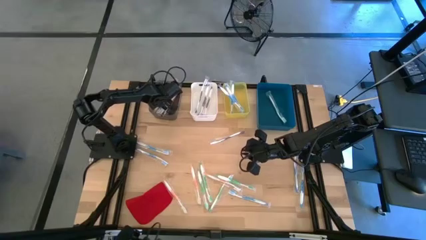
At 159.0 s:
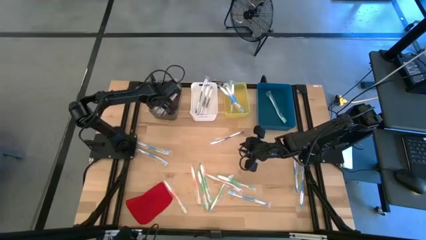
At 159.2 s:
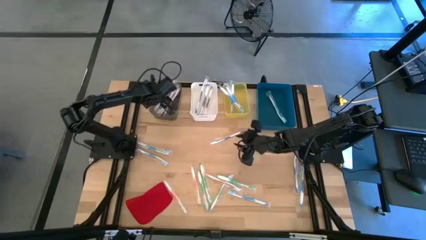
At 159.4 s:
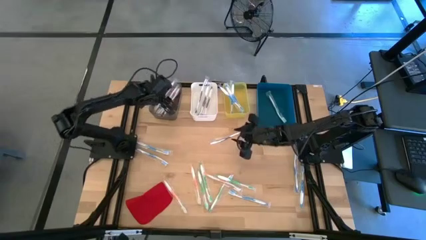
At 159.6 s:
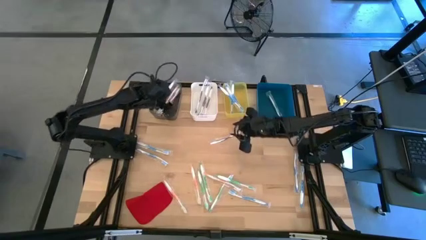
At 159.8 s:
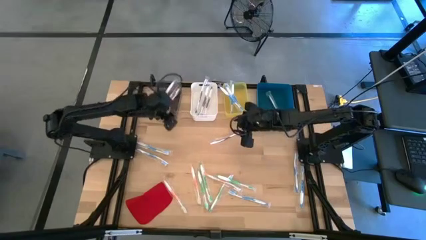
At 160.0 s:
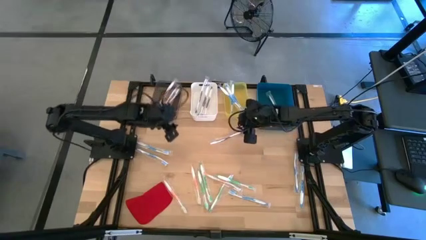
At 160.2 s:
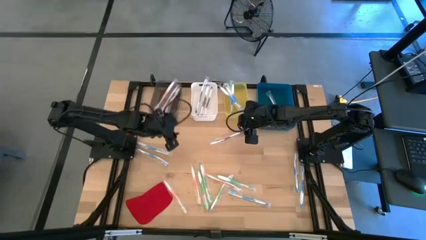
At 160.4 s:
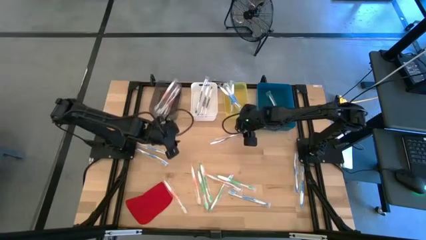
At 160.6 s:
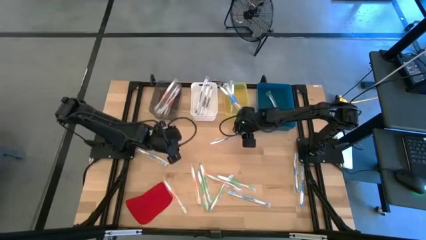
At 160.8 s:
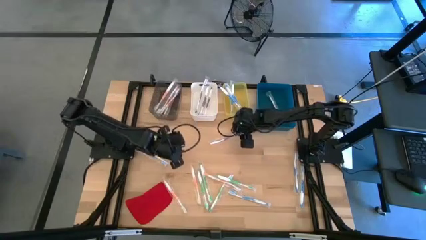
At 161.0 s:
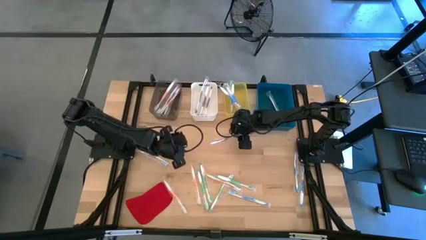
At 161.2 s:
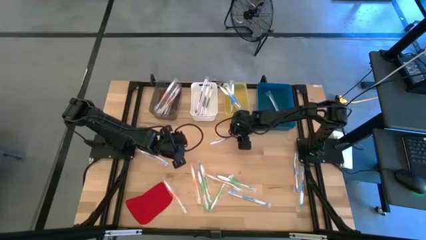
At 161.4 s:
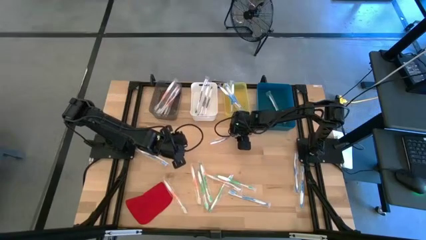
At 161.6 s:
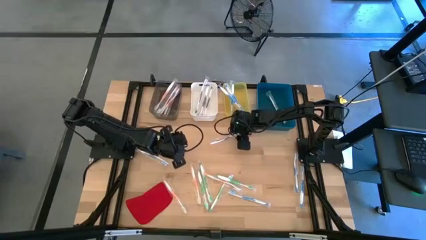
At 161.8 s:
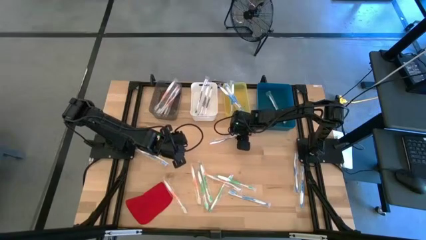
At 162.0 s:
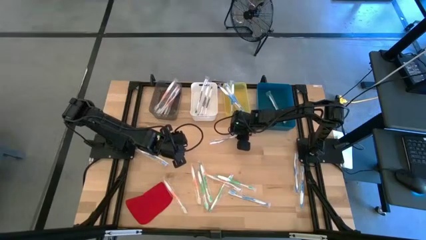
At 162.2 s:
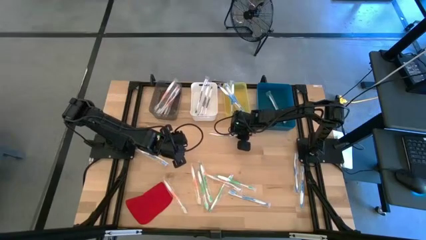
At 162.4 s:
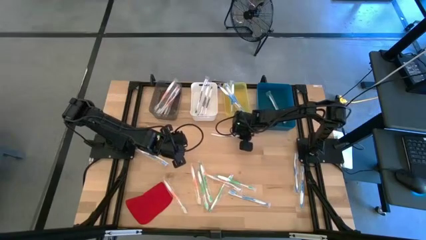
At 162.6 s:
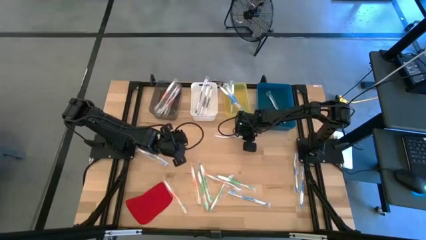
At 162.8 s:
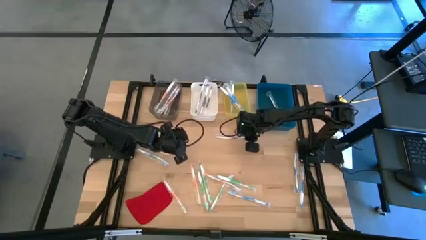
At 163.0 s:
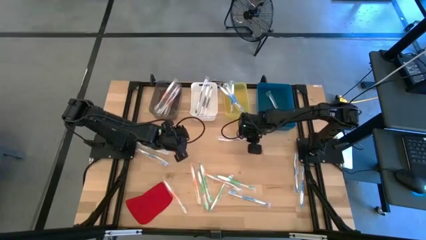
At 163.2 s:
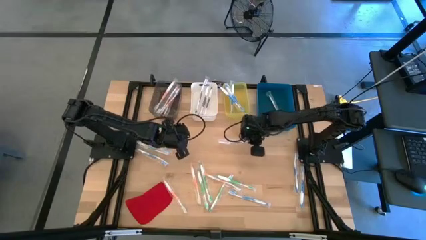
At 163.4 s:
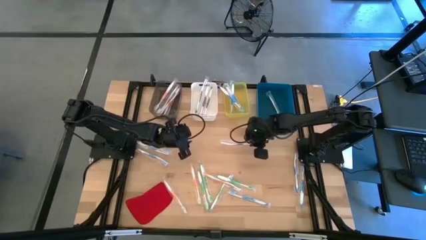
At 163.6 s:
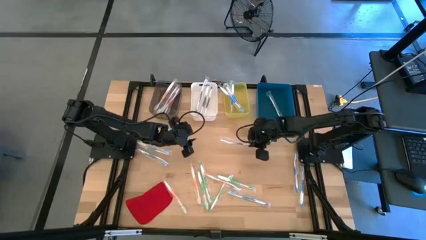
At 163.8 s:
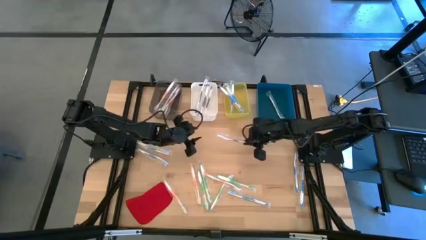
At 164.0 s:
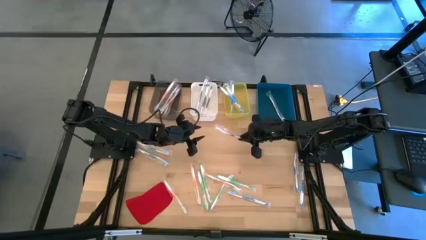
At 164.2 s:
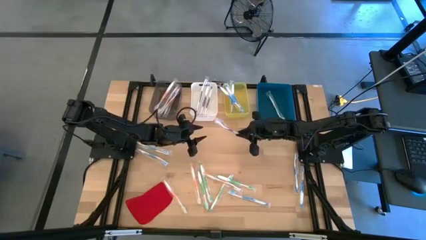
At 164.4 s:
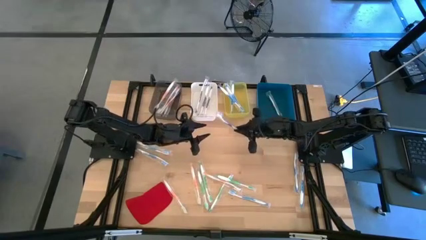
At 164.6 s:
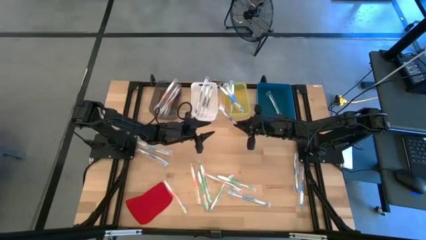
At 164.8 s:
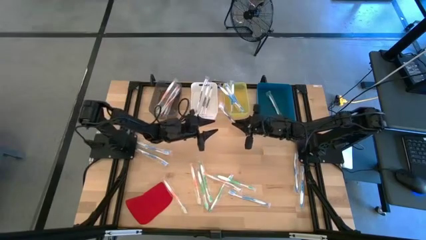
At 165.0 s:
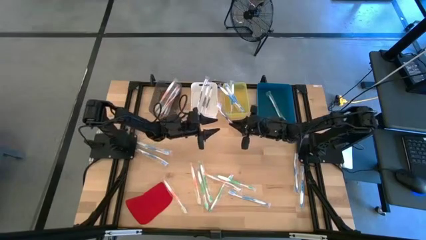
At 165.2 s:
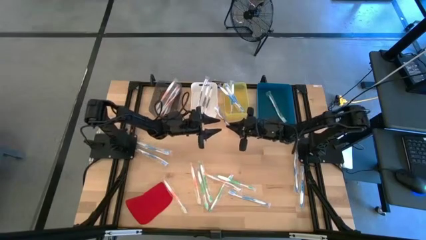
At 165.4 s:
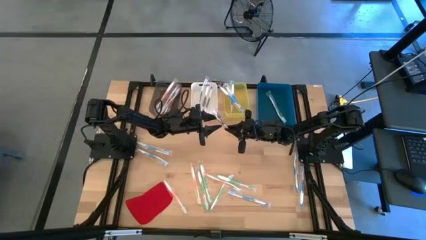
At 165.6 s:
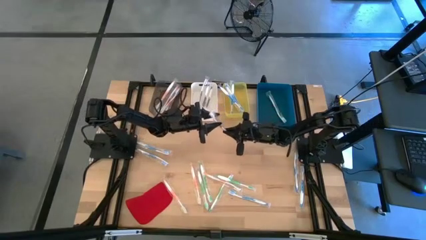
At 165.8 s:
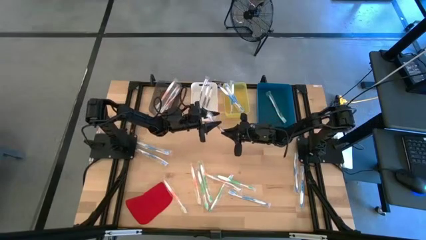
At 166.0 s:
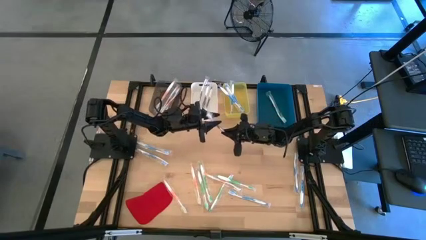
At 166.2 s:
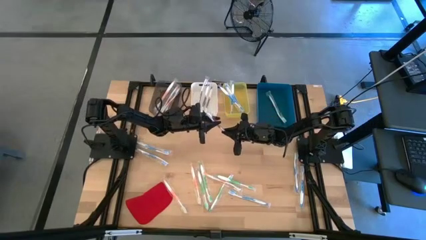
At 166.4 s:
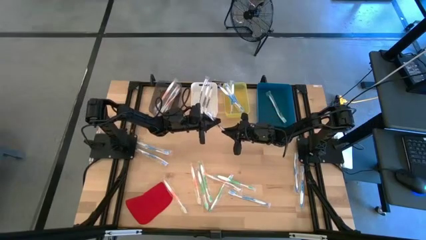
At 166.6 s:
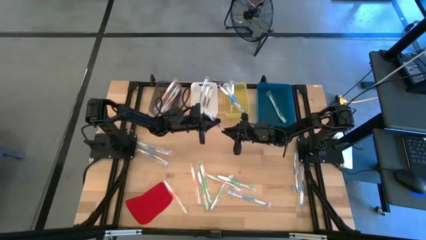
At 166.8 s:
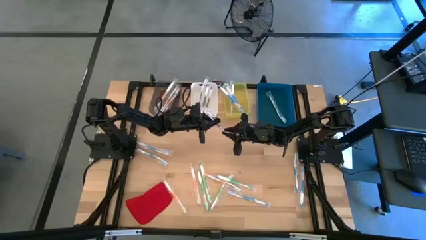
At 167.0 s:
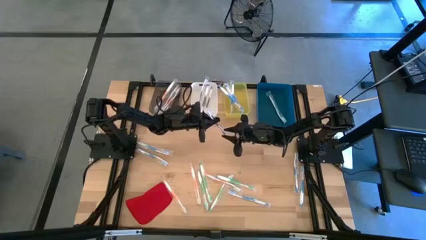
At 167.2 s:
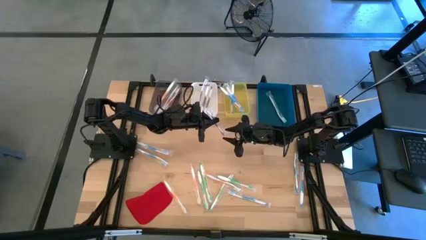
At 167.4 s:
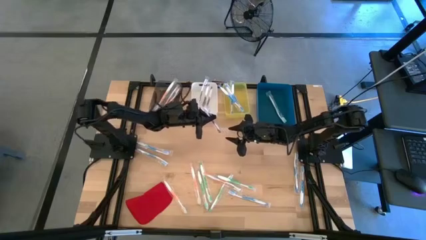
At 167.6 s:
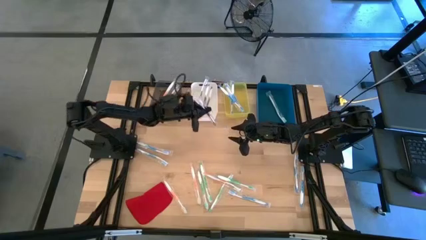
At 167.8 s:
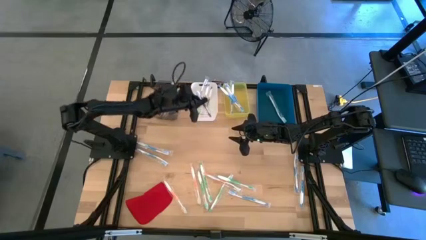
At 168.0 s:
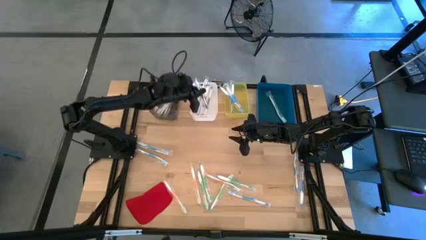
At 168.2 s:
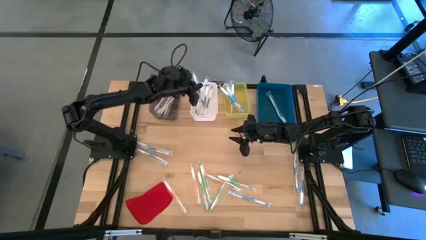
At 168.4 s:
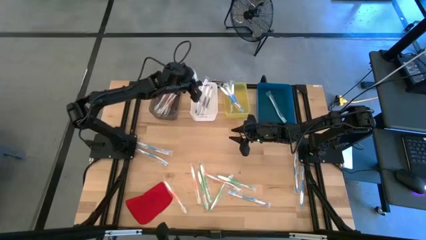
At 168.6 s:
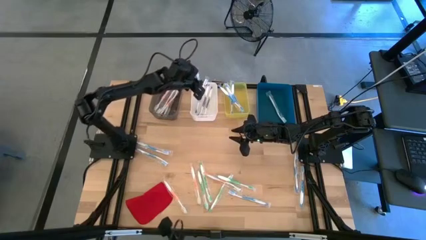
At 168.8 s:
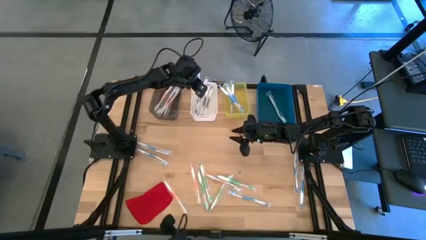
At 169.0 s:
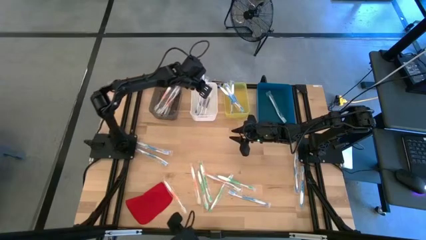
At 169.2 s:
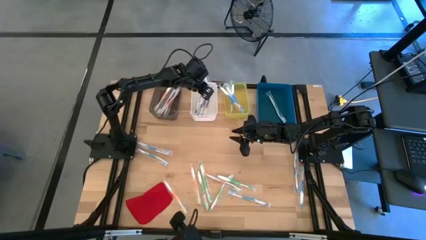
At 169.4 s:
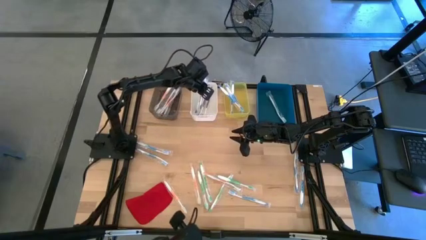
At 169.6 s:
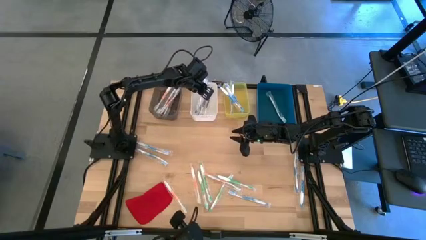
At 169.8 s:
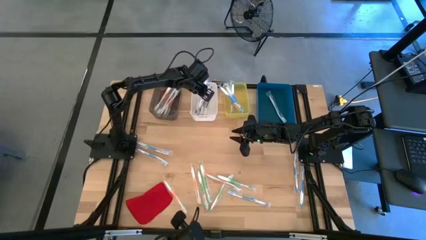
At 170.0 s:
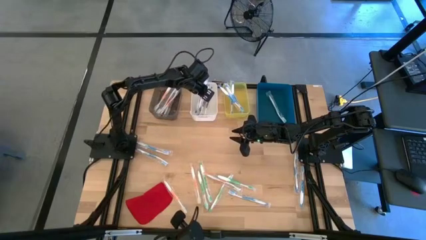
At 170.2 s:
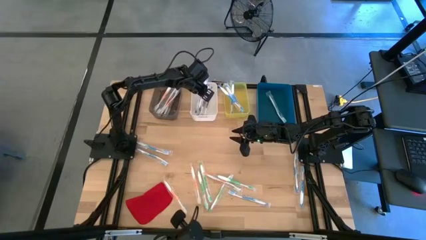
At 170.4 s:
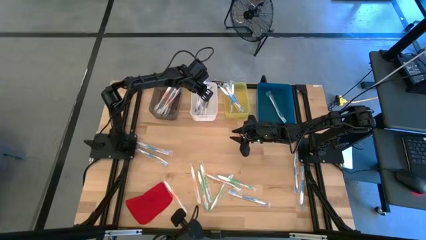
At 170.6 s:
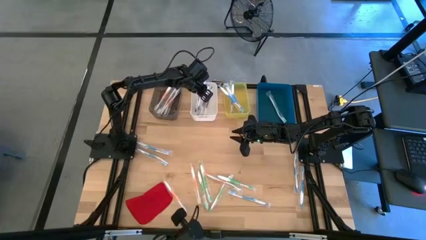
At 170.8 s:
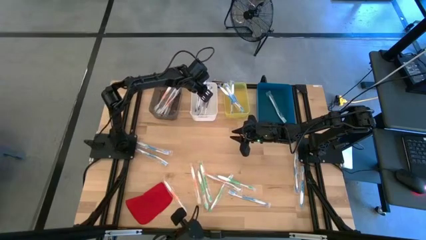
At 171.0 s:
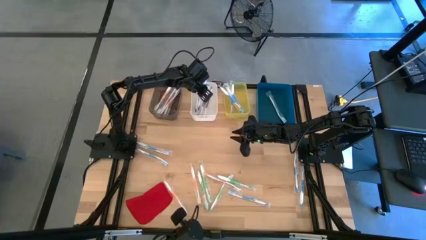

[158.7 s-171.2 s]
Task: Pick & Place Toothbrushes
Put the violet toothbrush into the white bin

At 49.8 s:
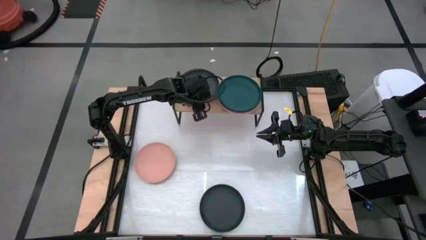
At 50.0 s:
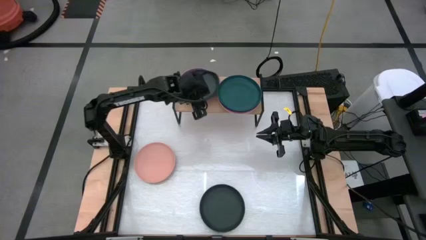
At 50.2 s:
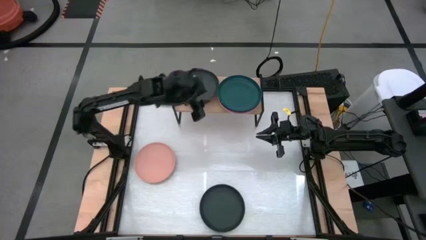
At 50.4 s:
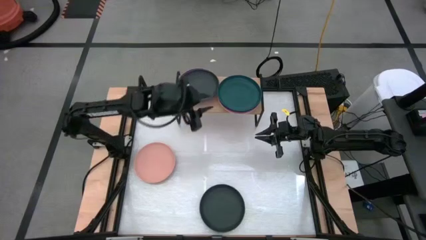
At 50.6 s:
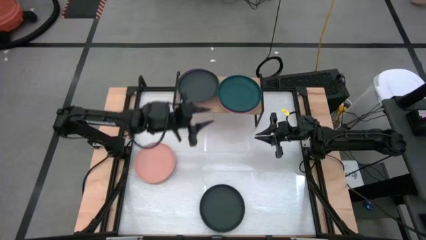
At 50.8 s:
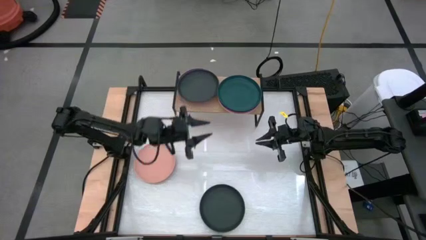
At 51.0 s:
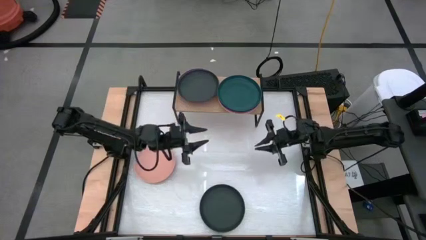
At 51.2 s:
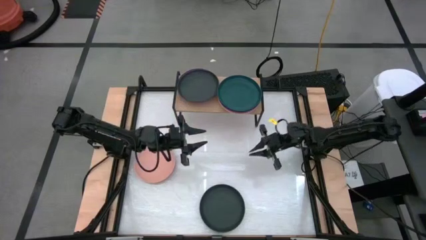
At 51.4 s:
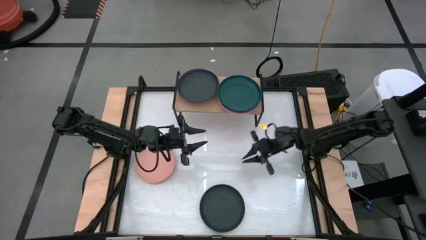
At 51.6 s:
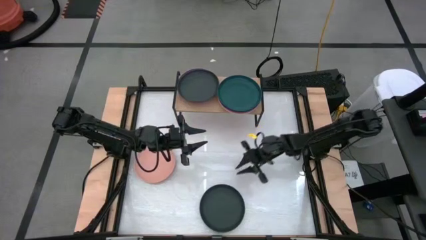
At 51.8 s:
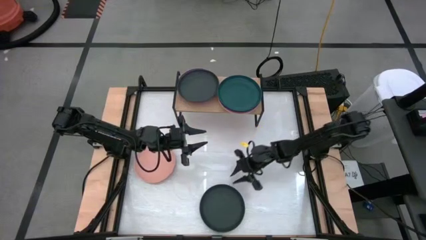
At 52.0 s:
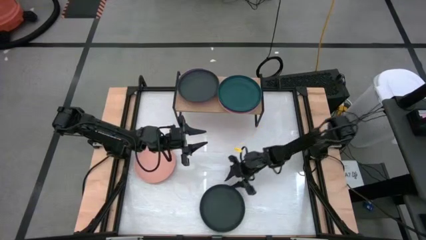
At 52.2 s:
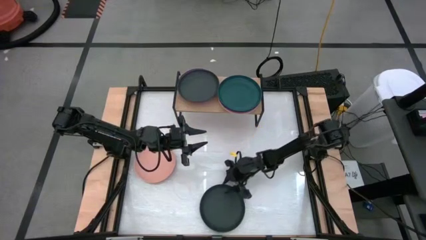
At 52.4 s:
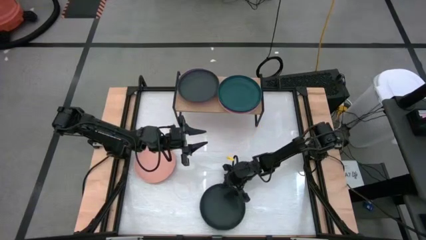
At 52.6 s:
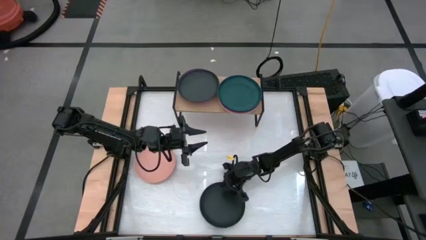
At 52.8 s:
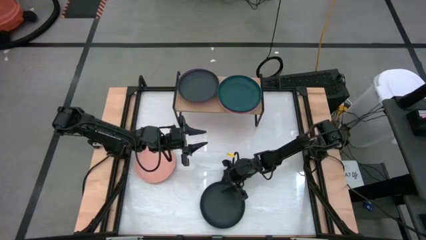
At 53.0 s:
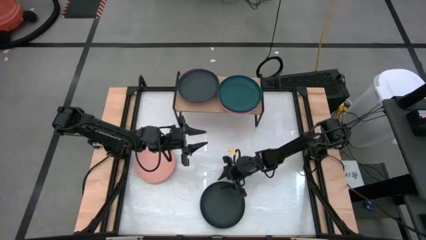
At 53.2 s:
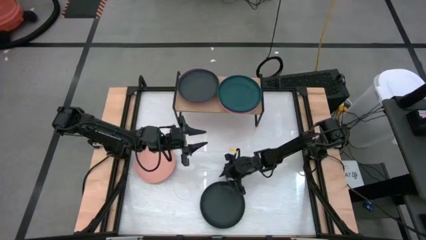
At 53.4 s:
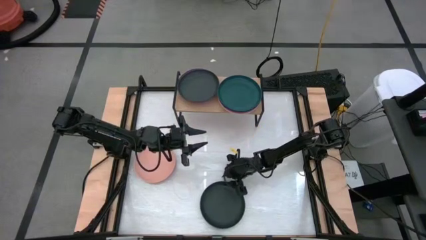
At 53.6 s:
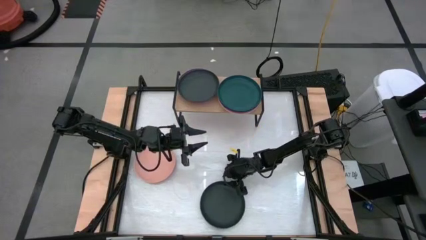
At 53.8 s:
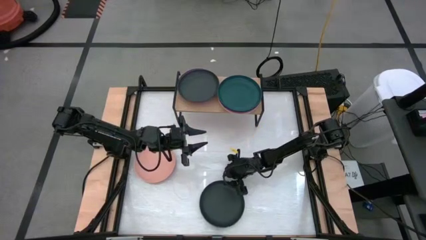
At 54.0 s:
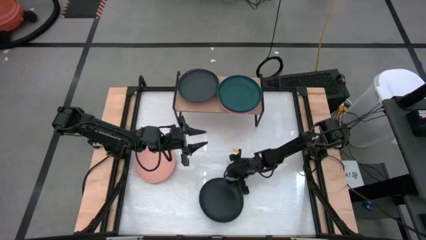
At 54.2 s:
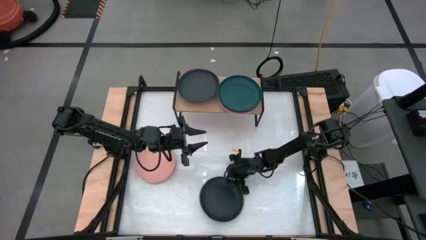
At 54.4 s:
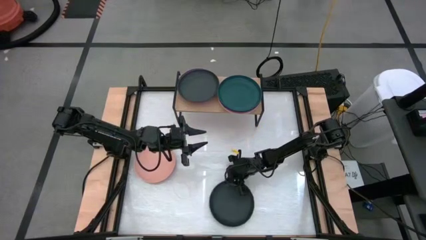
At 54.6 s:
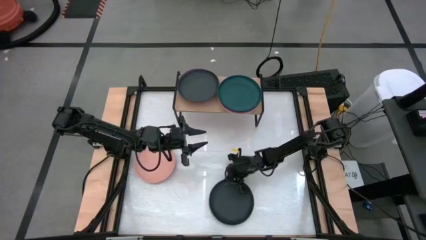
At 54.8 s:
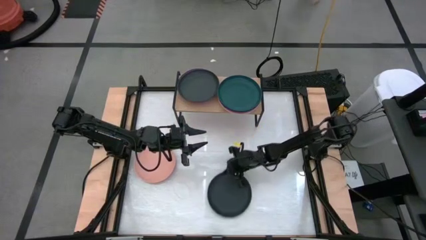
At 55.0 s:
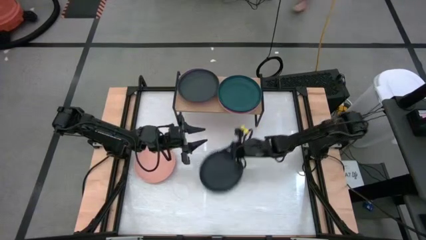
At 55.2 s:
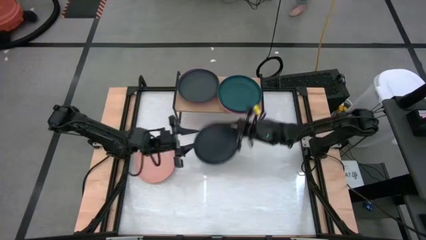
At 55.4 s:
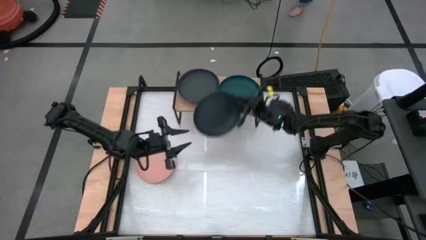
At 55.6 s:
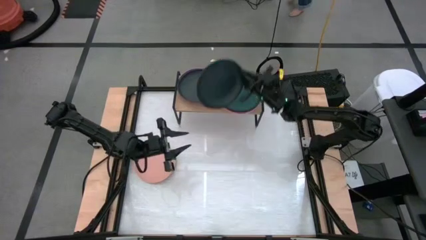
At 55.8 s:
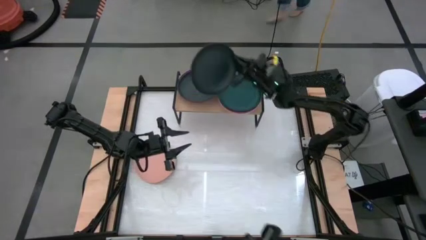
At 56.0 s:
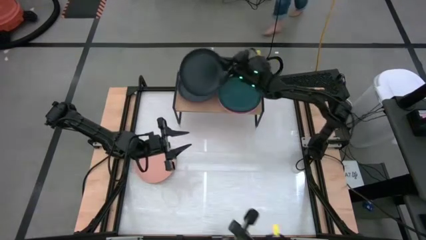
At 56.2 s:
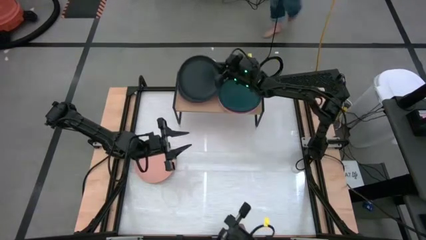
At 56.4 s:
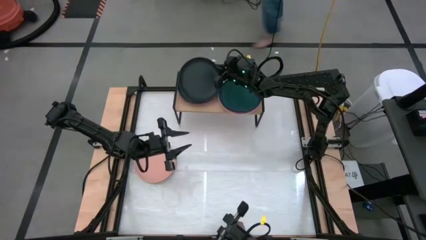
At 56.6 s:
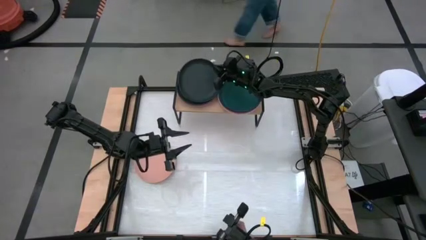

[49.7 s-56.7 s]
Task: Place and stack plates onto a shelf
Stack the black plate on top of the black plate on the shelf
